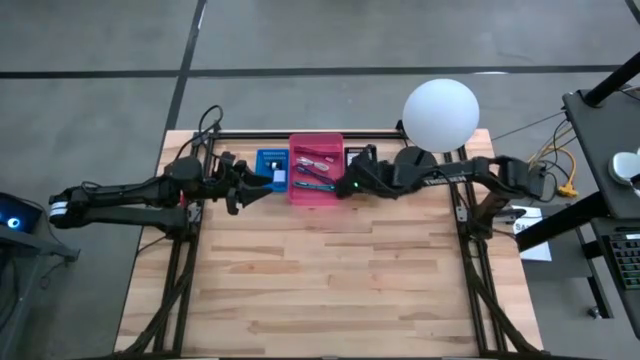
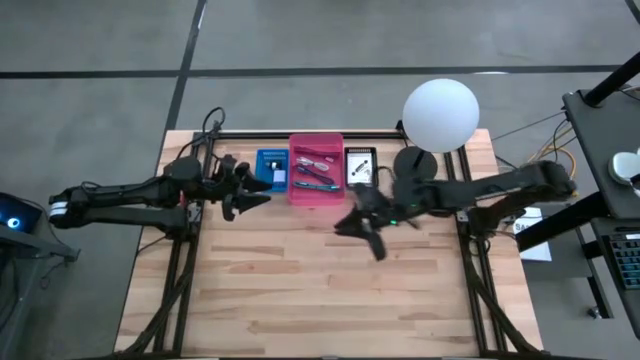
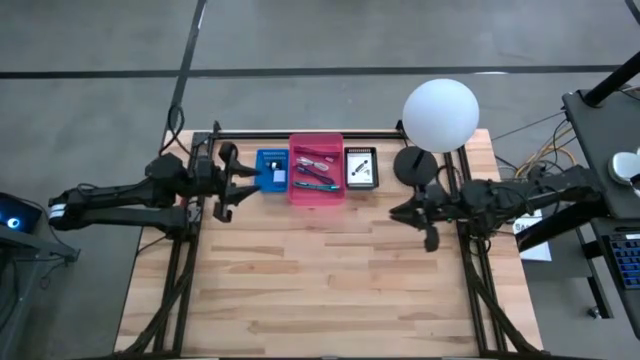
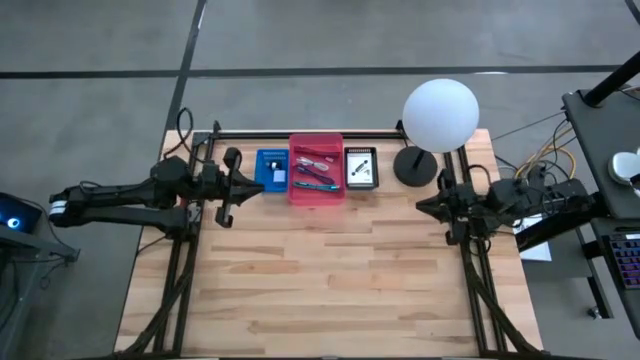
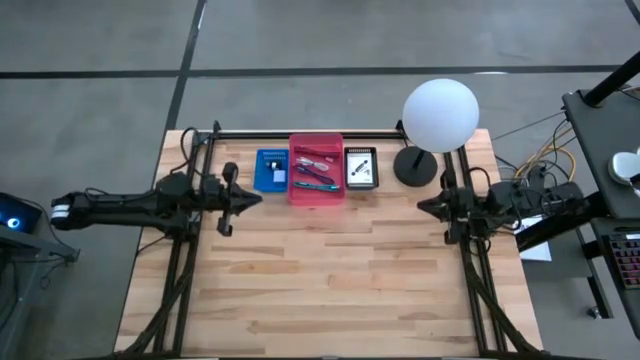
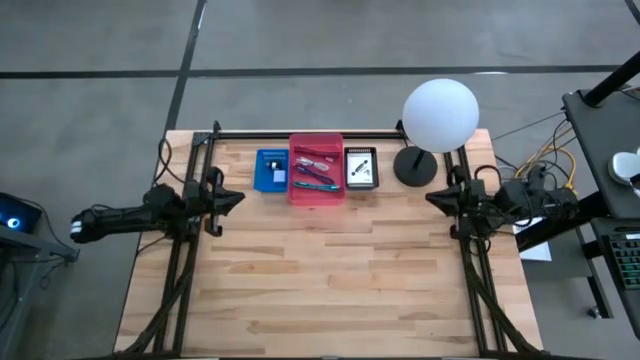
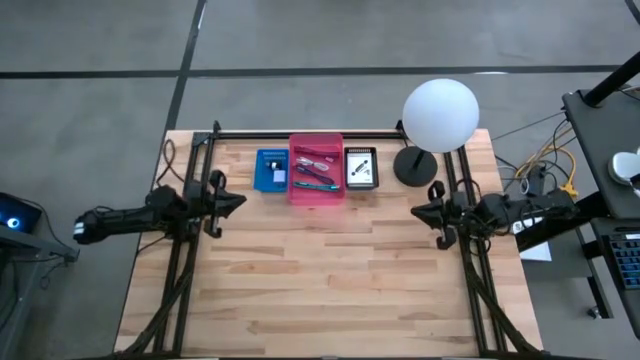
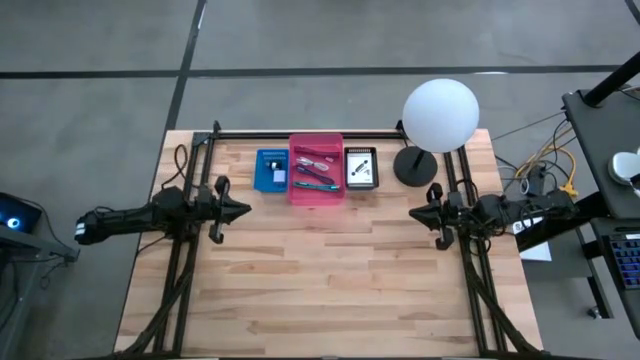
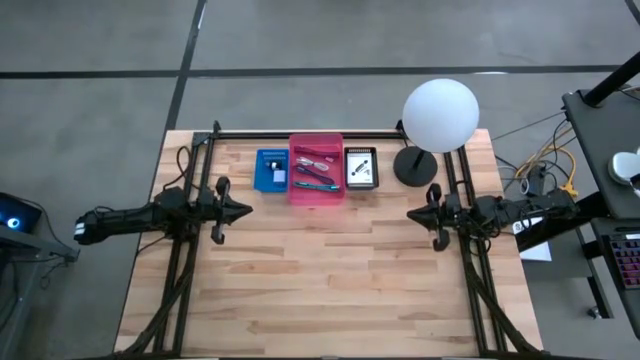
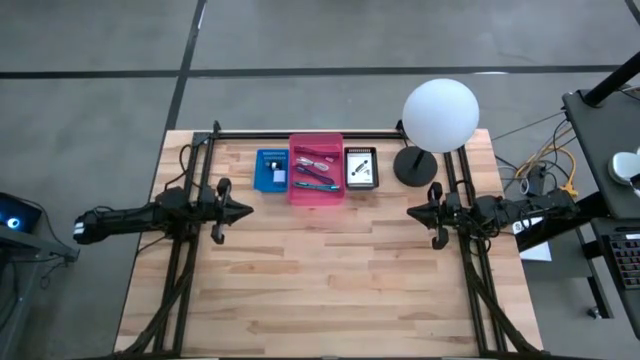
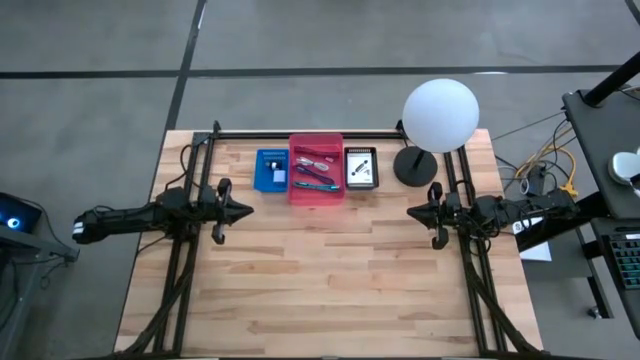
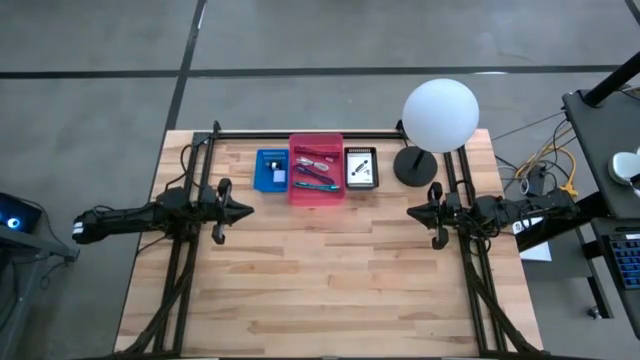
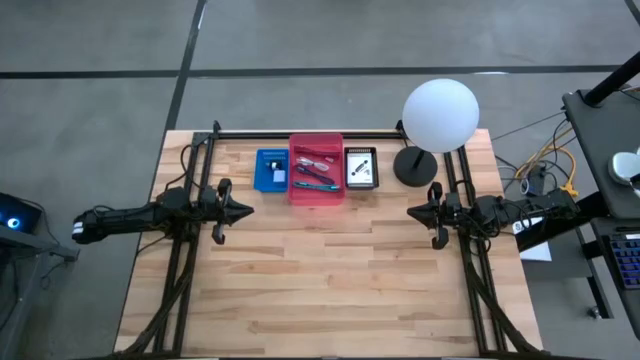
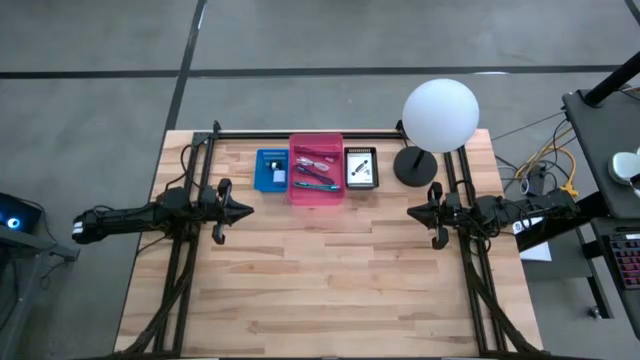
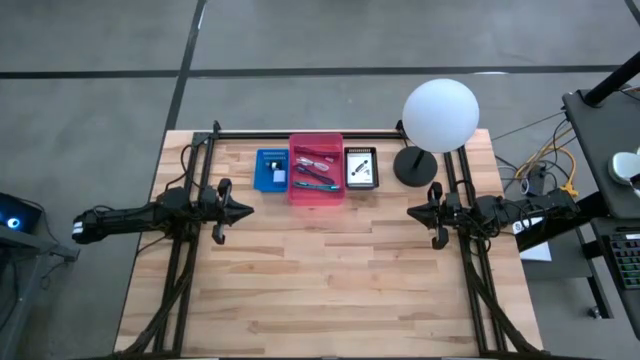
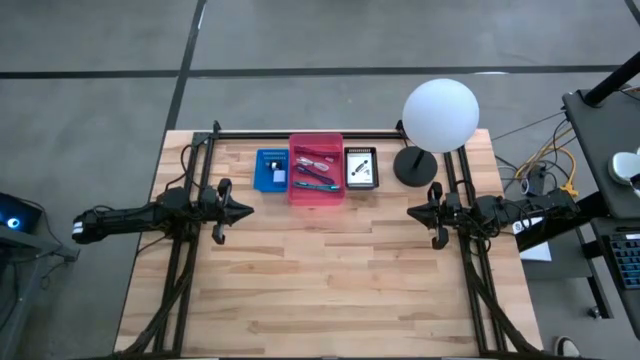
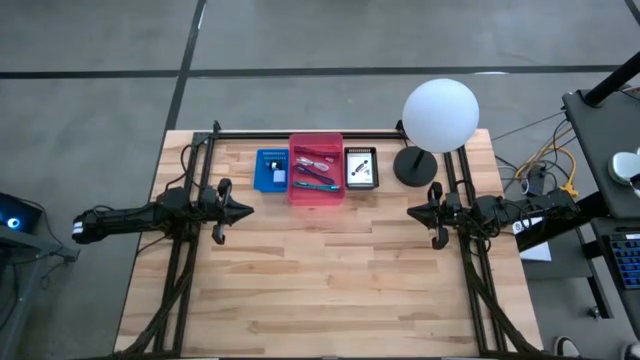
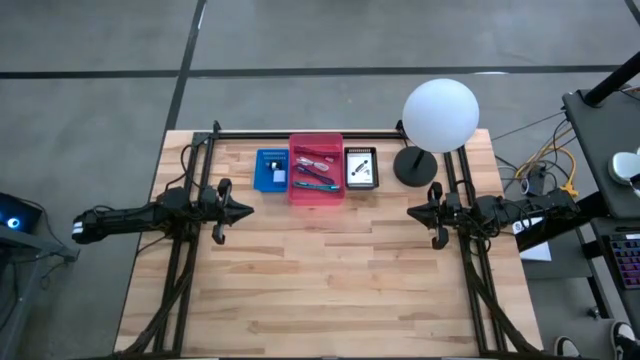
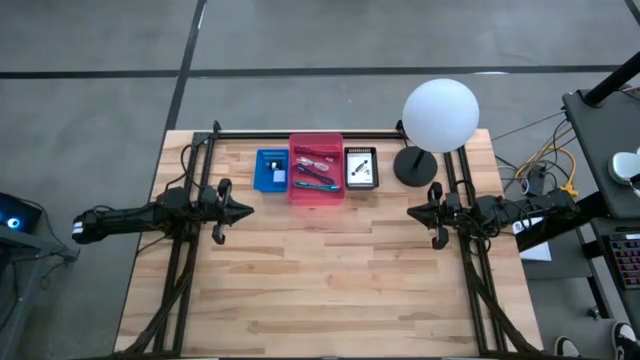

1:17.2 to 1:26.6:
Task: Pick and place items into bin
Return to Home Position

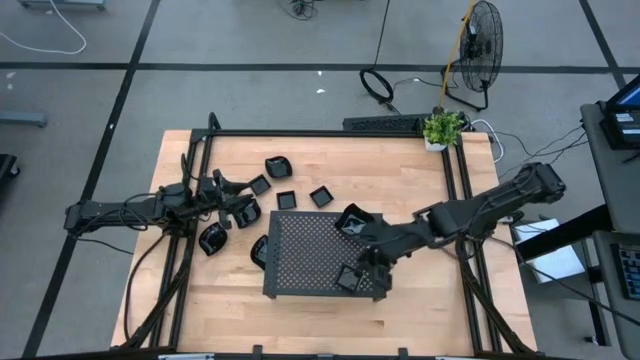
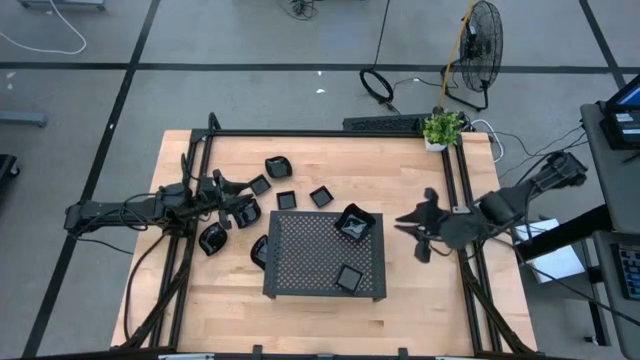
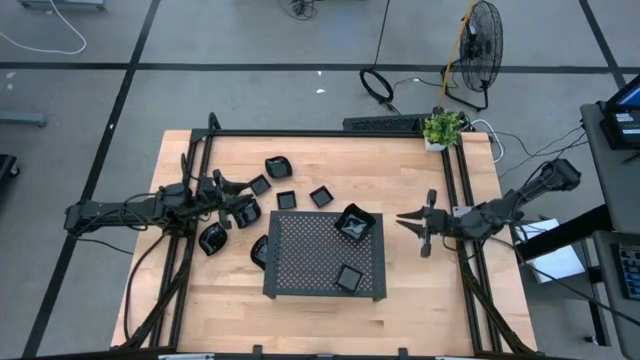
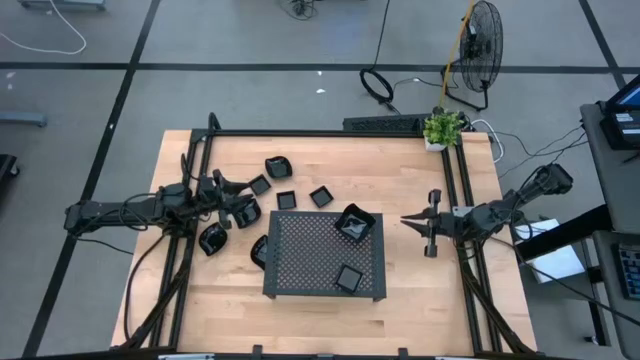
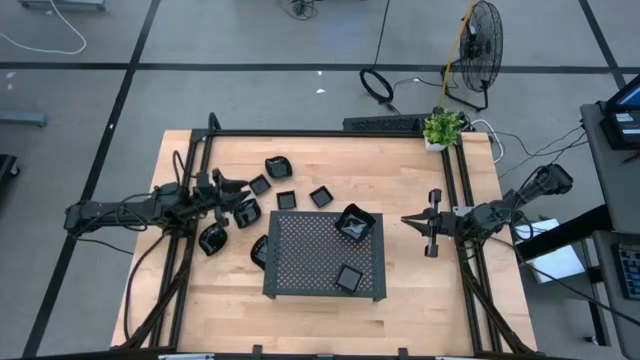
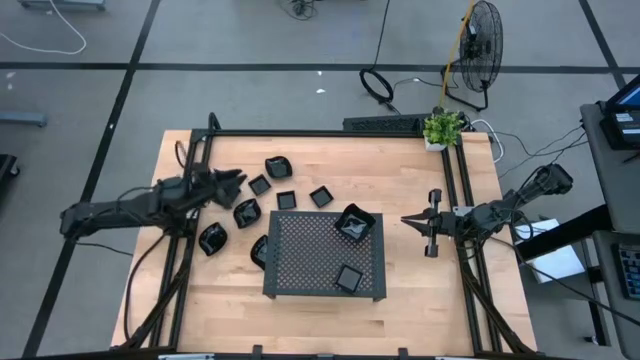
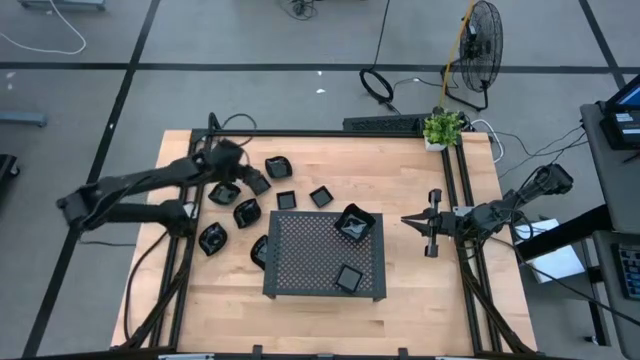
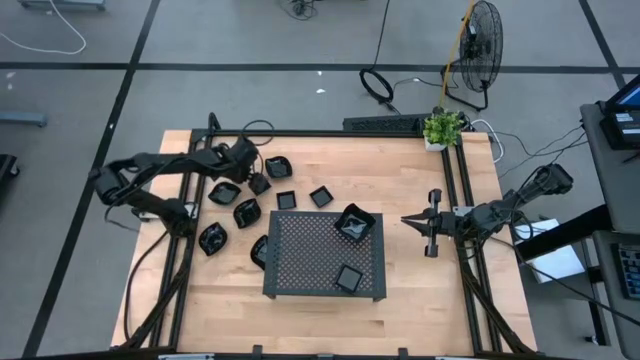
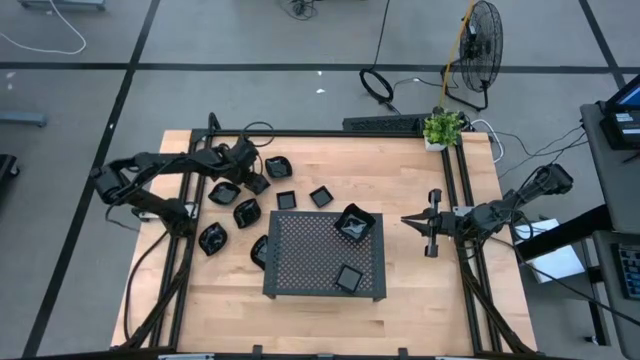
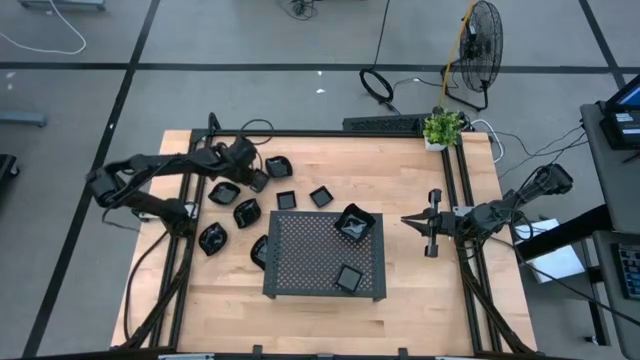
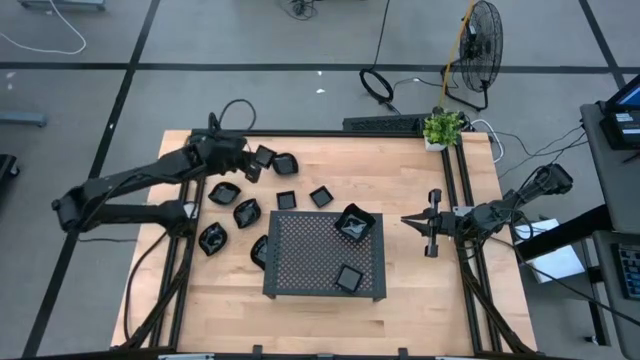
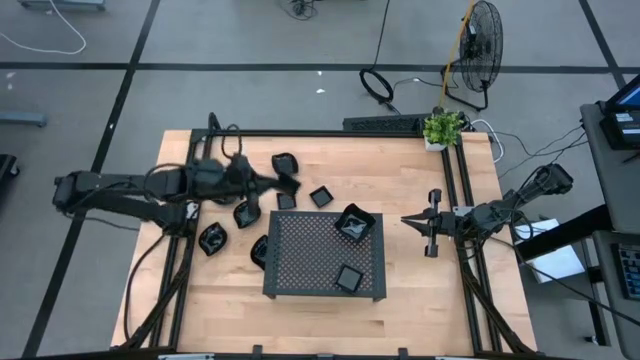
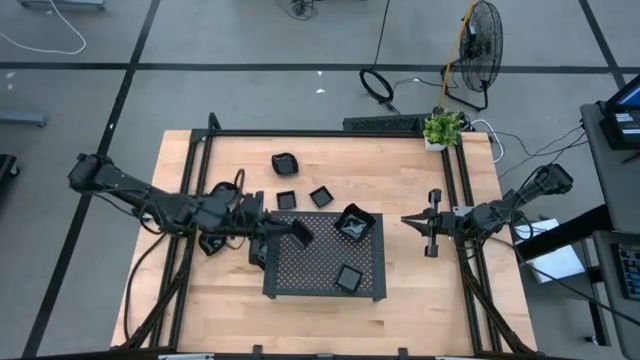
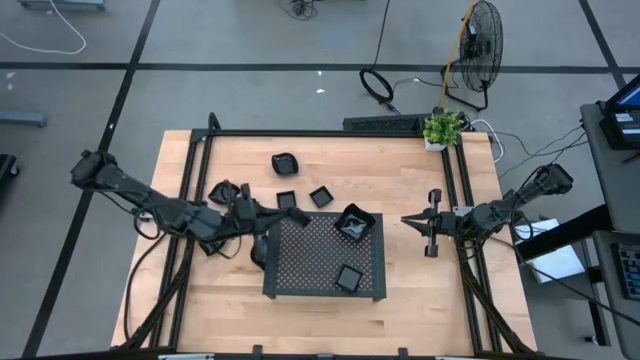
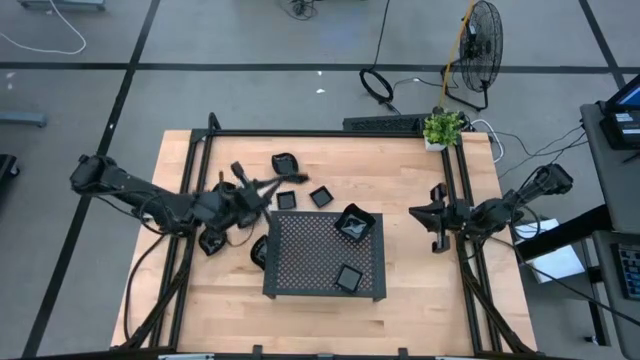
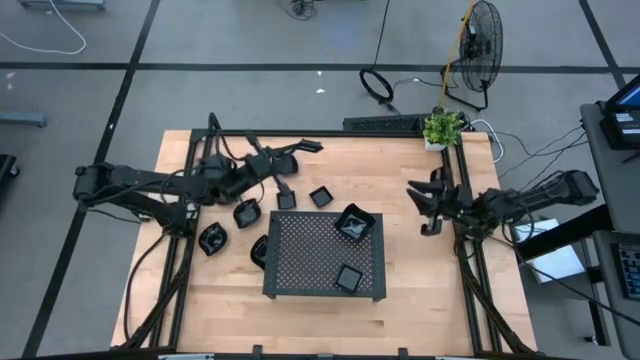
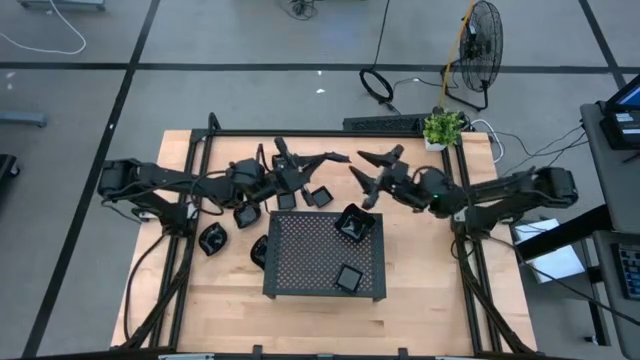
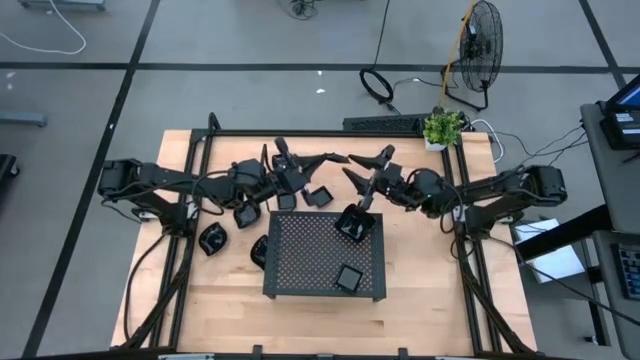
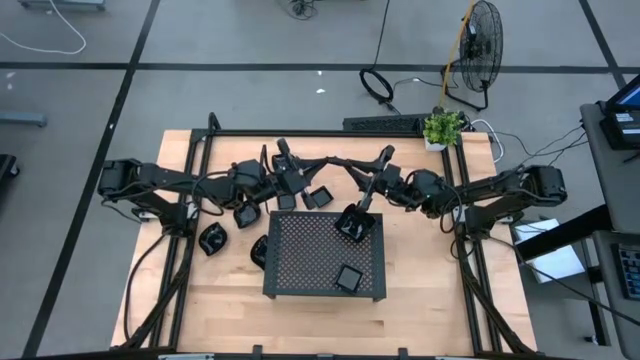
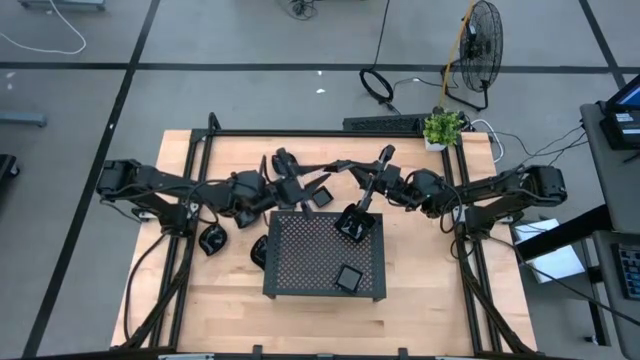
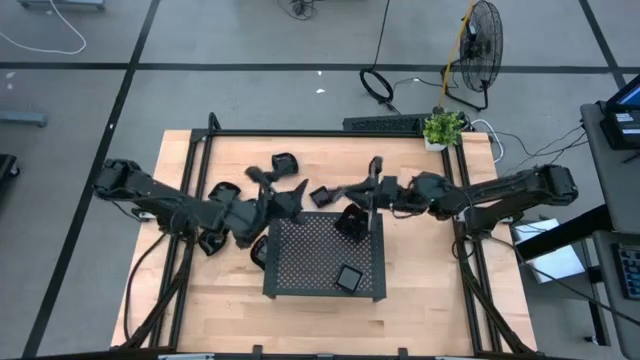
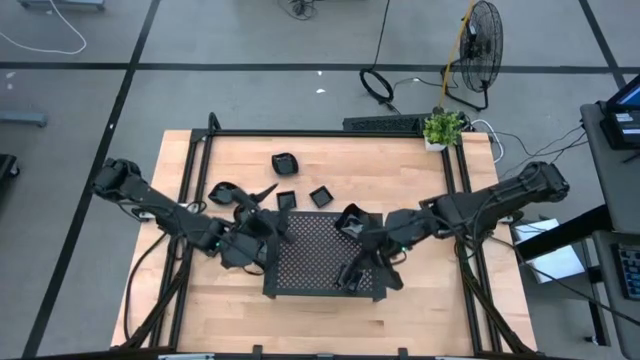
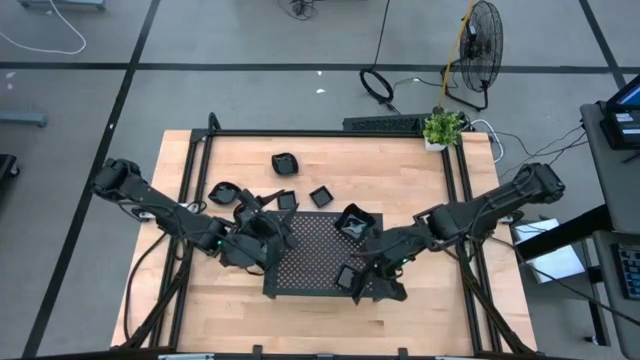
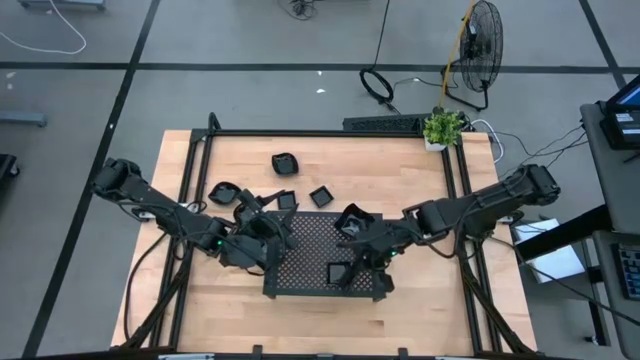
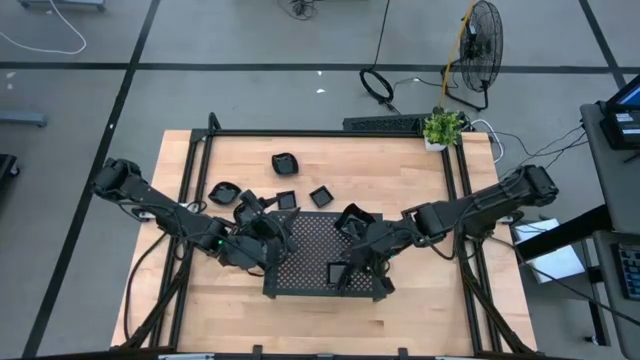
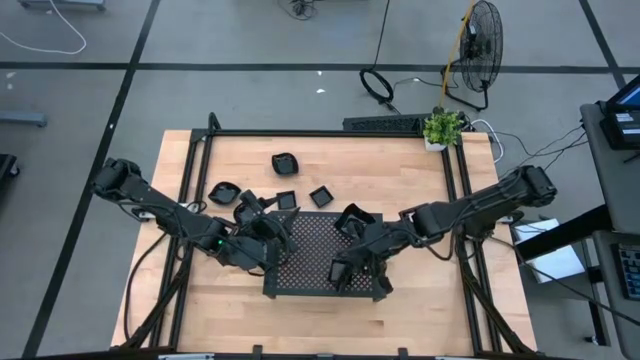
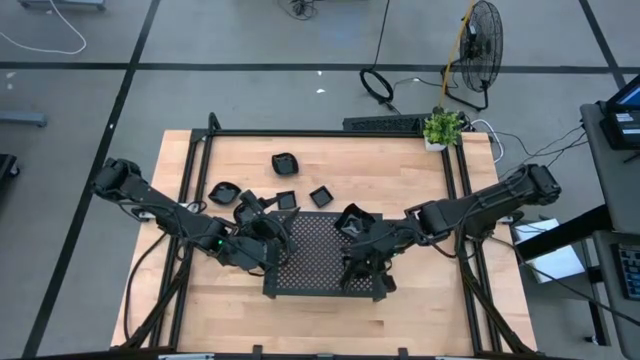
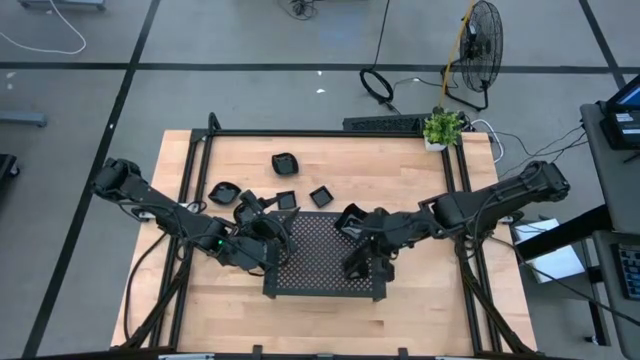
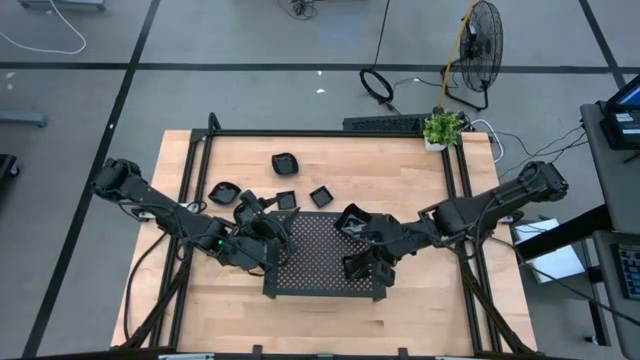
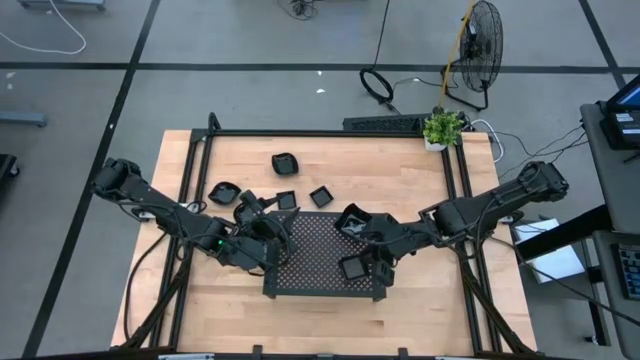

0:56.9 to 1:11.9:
Task: Pick & Place Mini shaped plates
Stack the black square plate on top of the black square plates on the shelf
